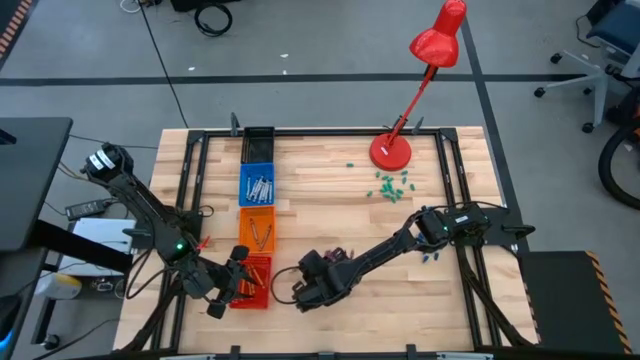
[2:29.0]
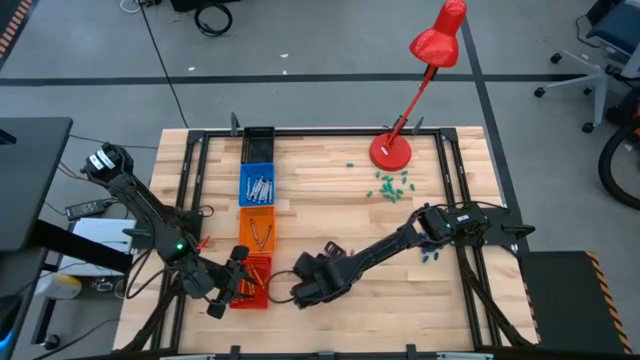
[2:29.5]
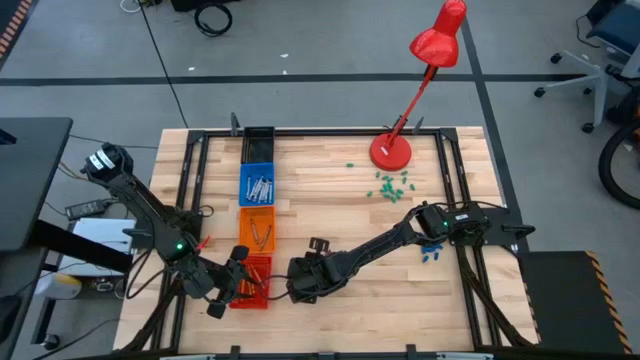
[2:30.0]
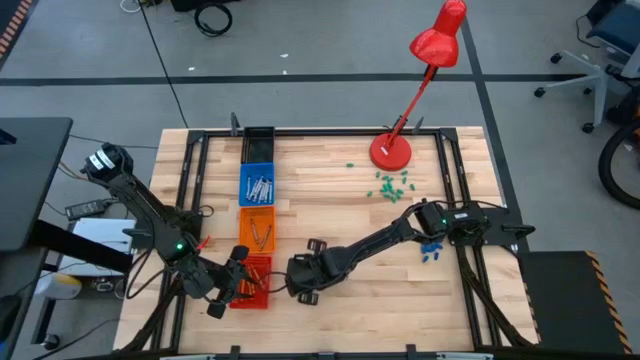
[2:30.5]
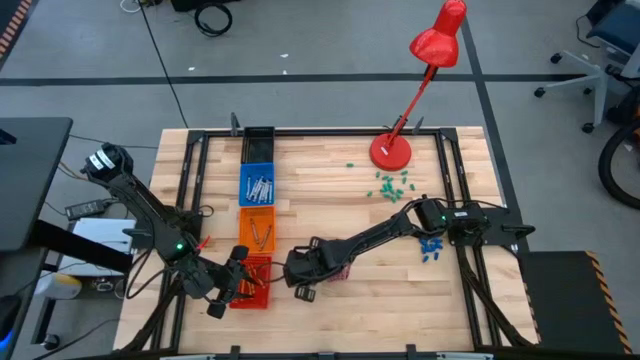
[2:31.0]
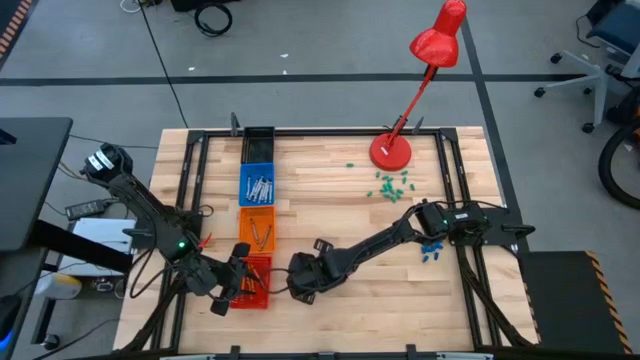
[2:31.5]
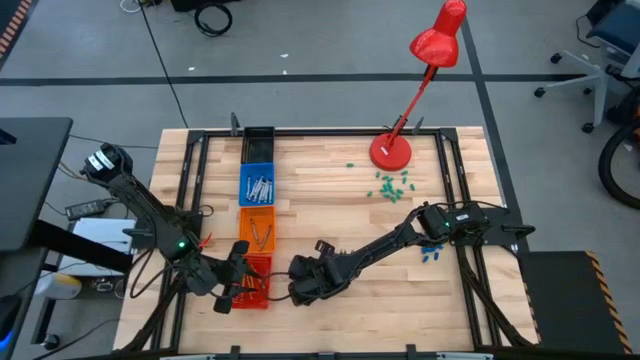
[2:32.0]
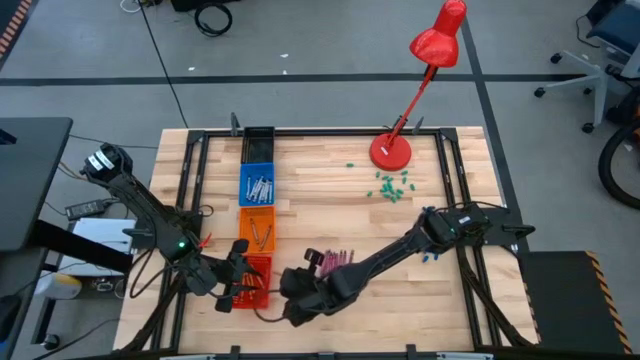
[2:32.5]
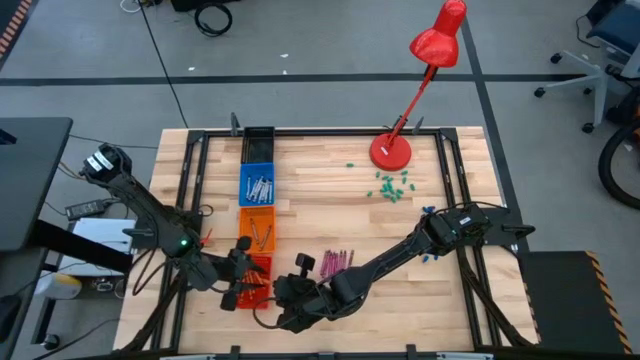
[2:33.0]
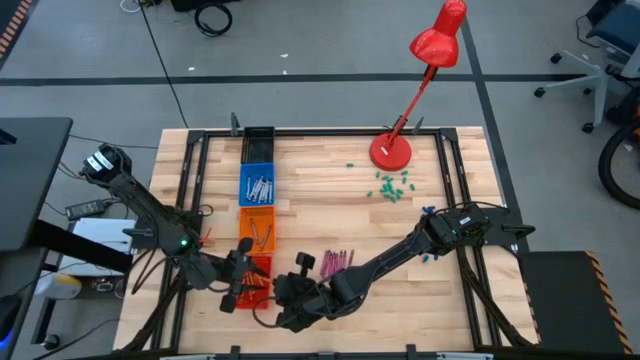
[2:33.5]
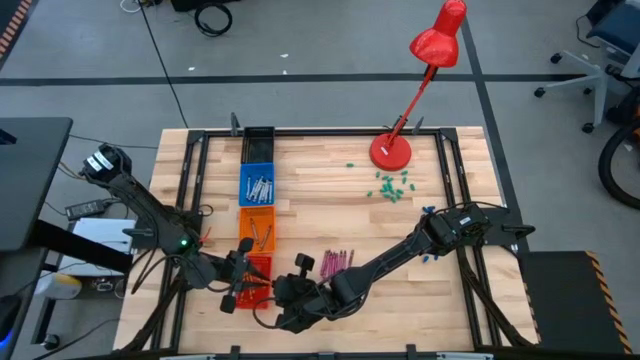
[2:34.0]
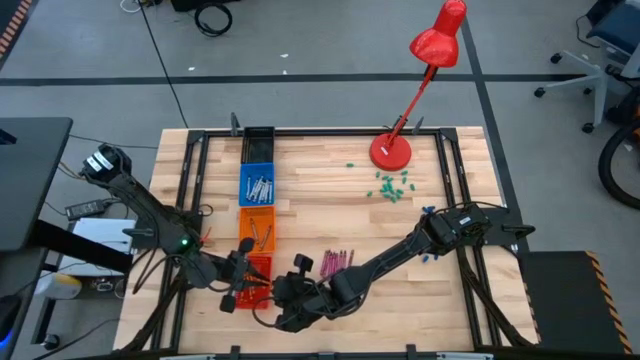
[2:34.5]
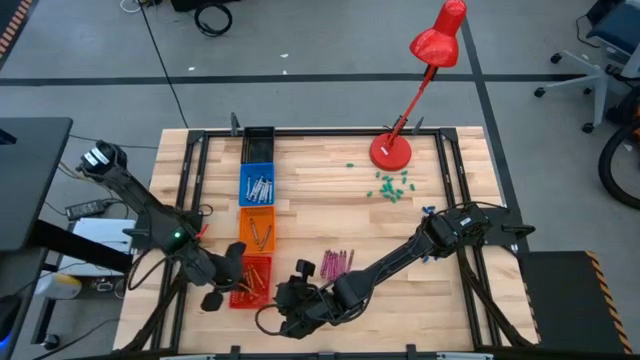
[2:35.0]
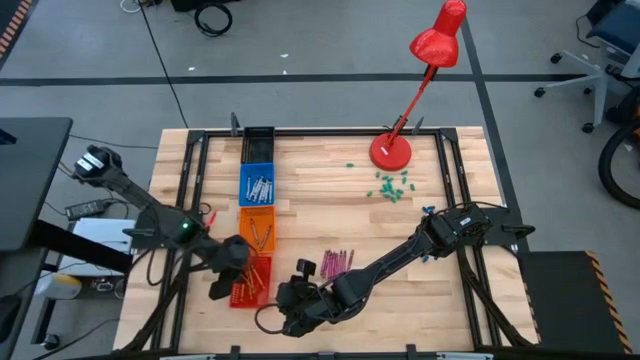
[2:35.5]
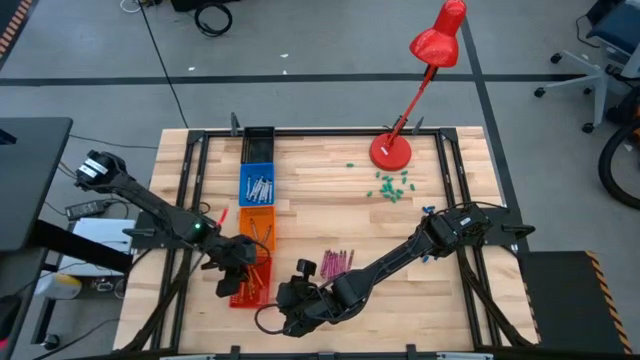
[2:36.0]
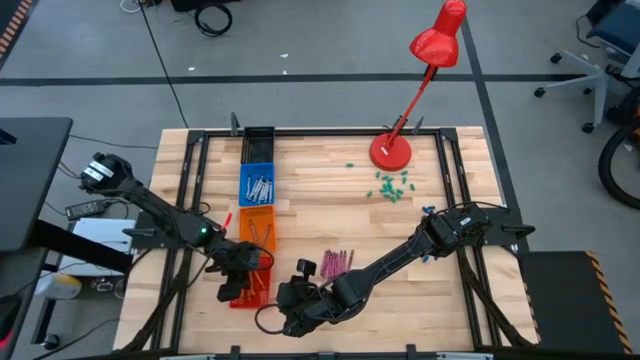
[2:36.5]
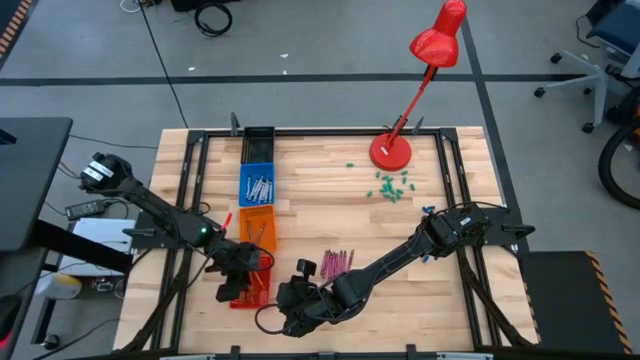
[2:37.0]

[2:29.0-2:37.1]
Task: Sort crayons
Put the orange crayon into the red bin

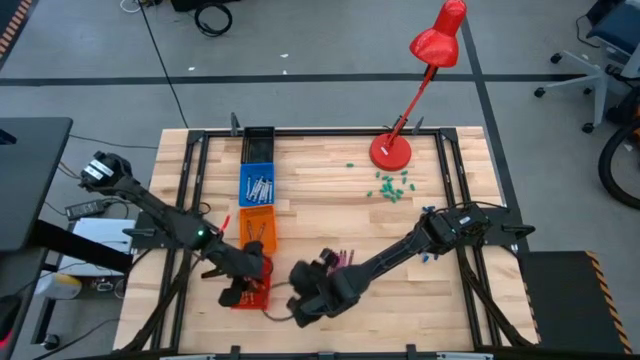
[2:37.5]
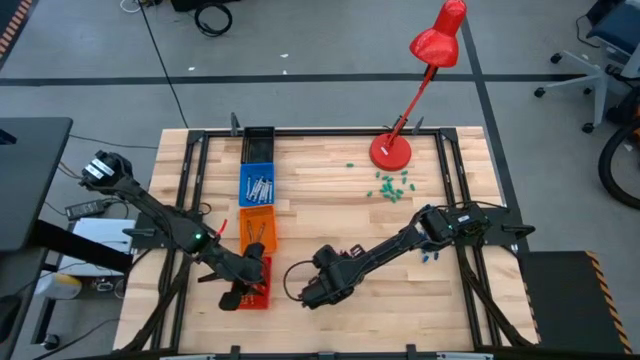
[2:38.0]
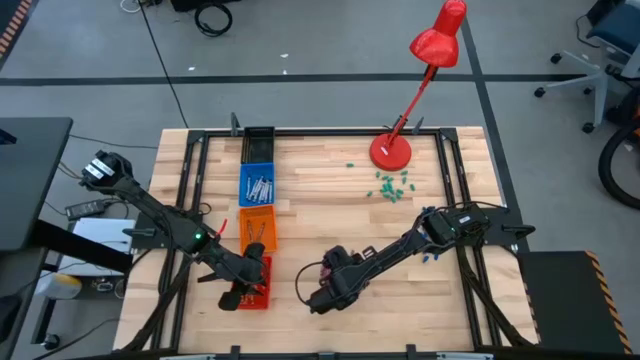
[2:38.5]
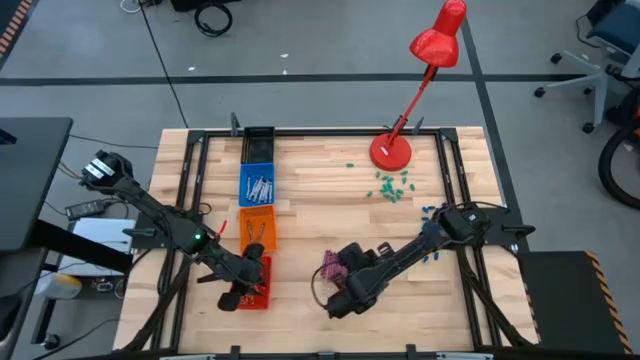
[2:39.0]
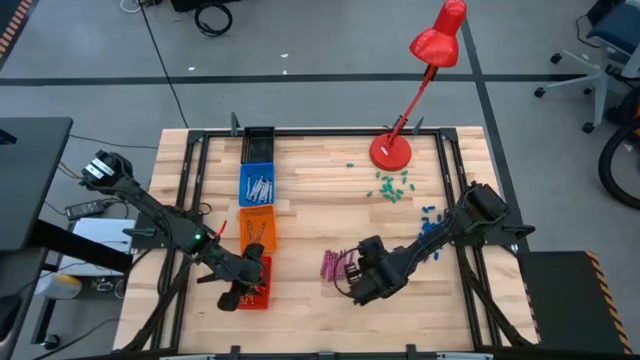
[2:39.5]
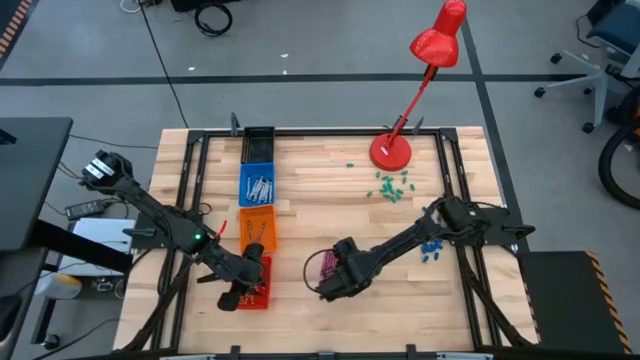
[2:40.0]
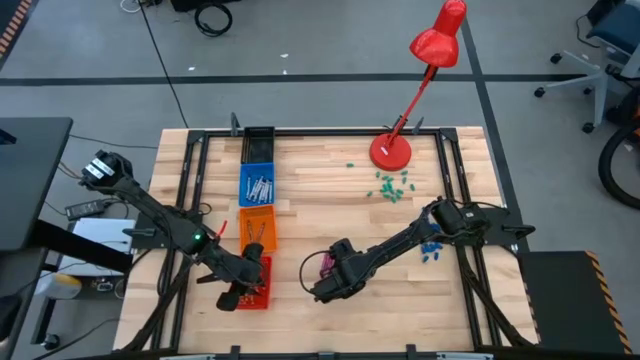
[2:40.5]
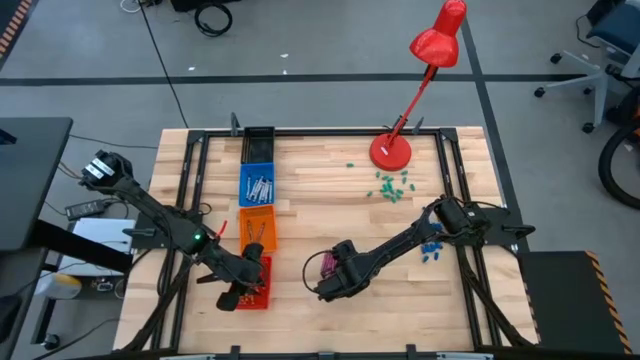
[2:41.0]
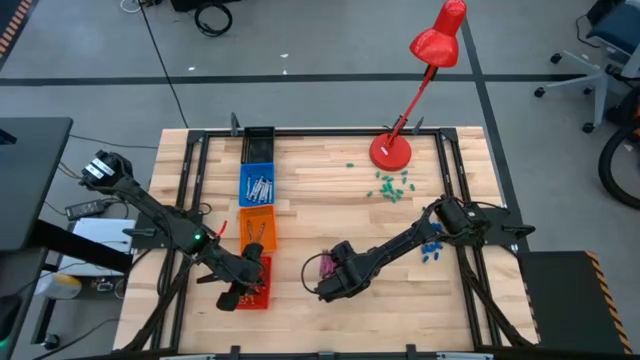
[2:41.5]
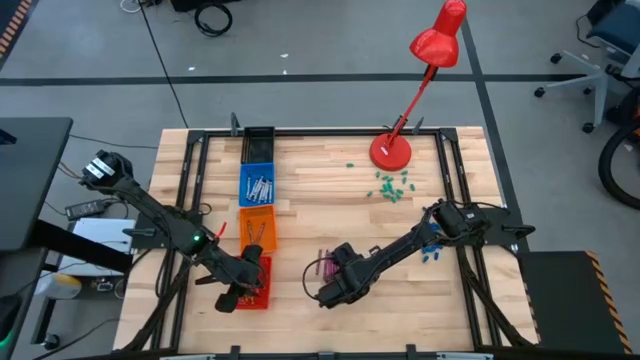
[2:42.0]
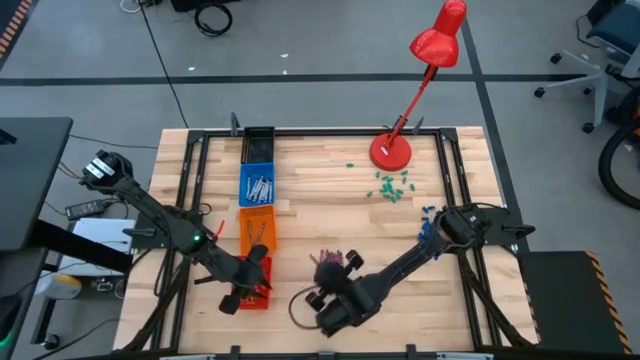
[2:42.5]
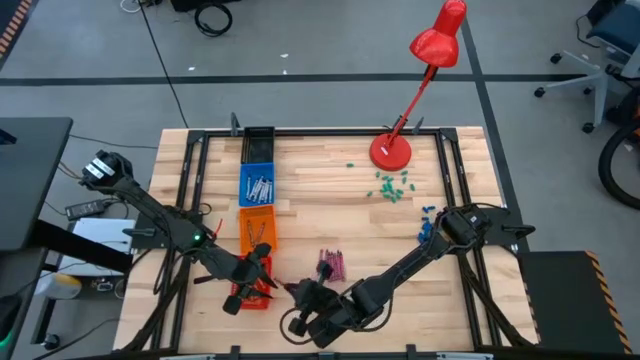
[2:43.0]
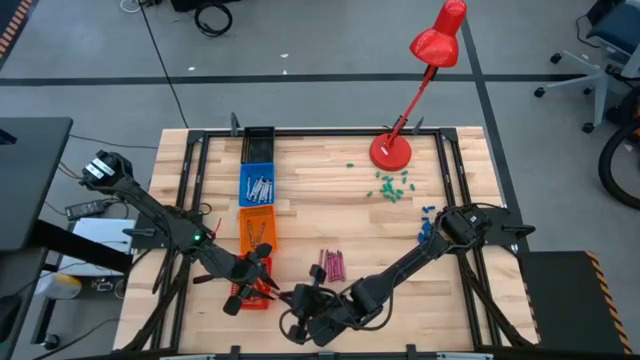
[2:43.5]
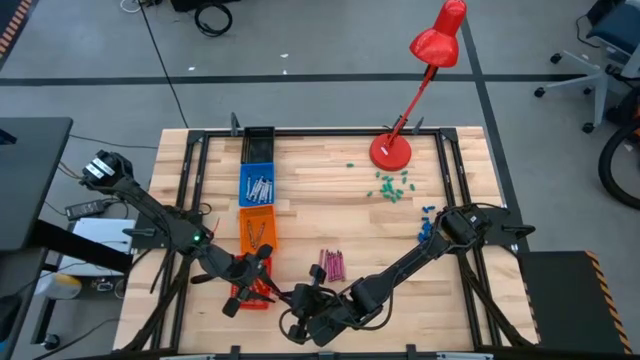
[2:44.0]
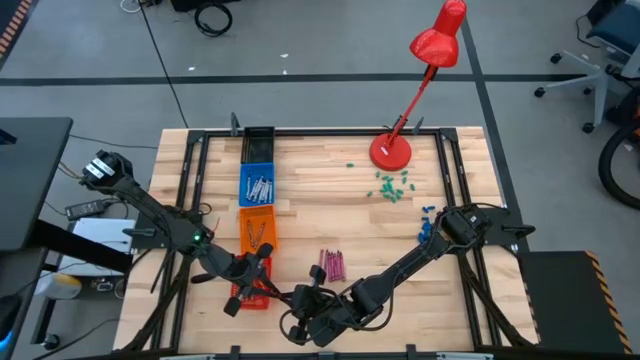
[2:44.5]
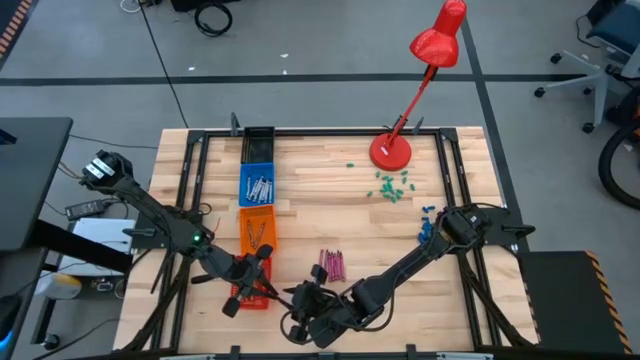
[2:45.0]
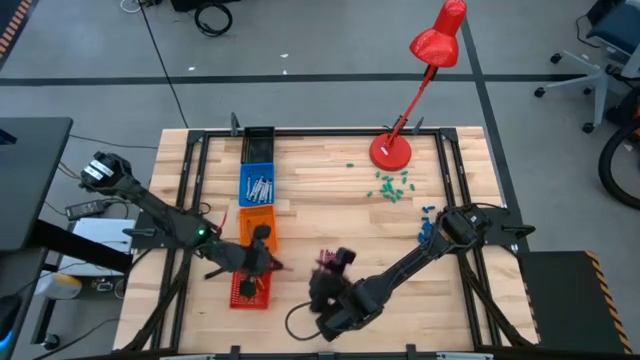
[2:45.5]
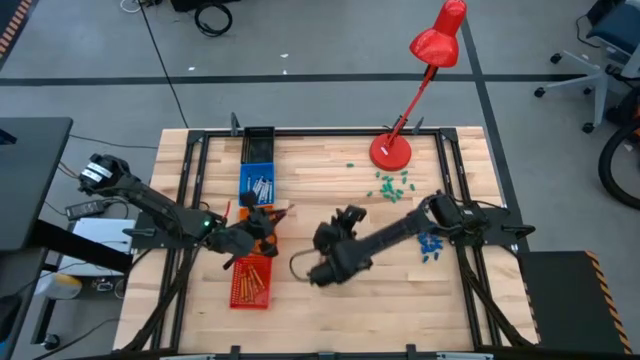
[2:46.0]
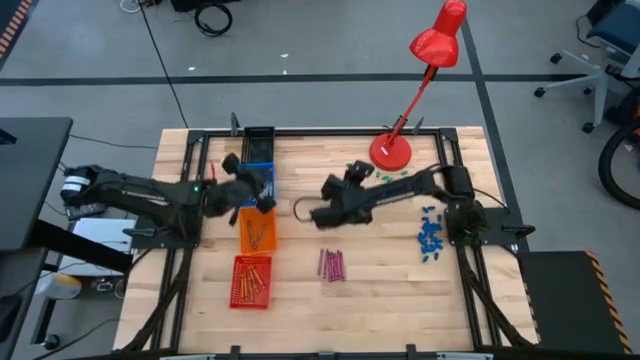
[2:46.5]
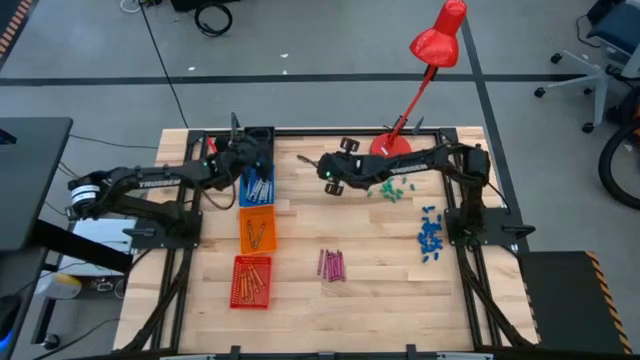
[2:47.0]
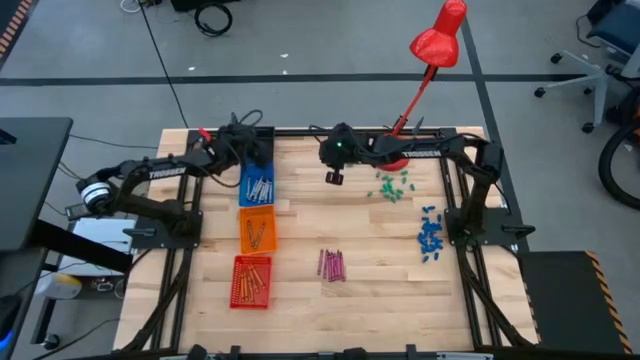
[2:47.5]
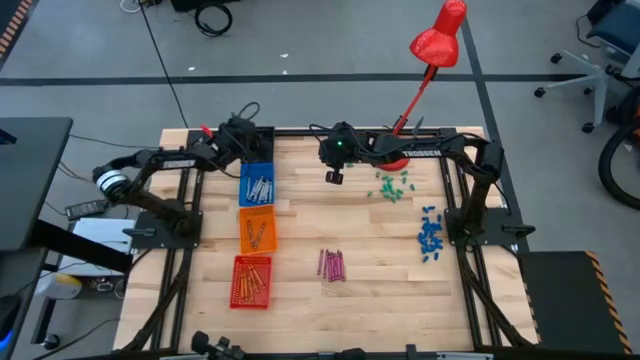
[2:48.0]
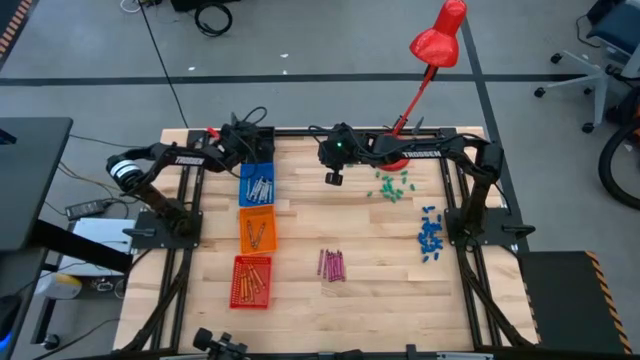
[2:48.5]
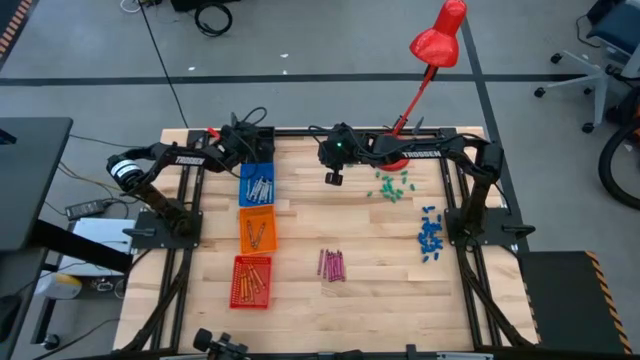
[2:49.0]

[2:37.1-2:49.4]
Put the pink crayon into the black bin
